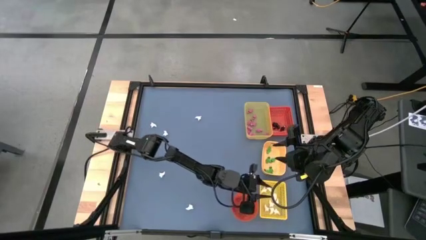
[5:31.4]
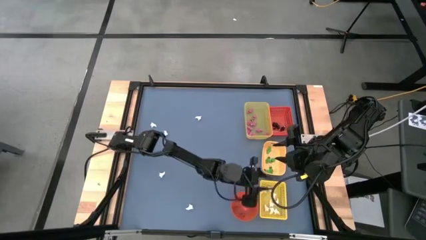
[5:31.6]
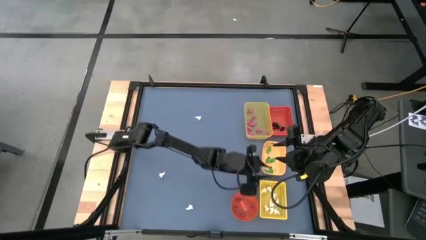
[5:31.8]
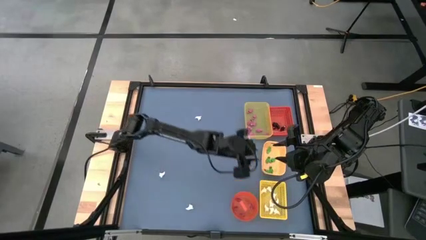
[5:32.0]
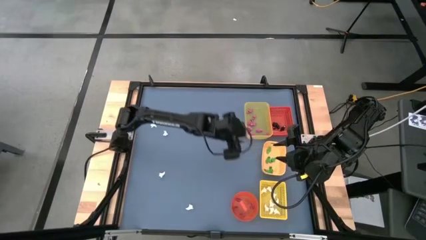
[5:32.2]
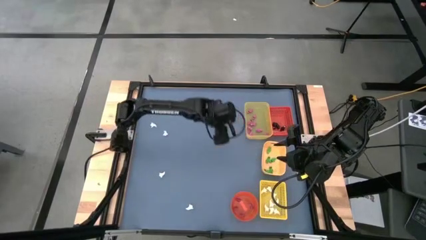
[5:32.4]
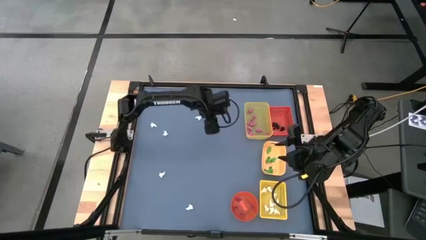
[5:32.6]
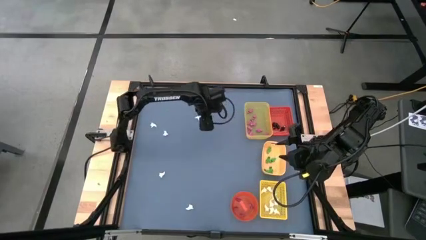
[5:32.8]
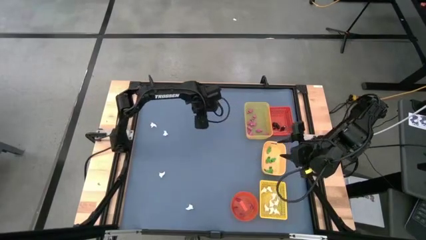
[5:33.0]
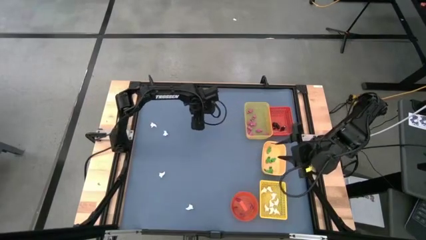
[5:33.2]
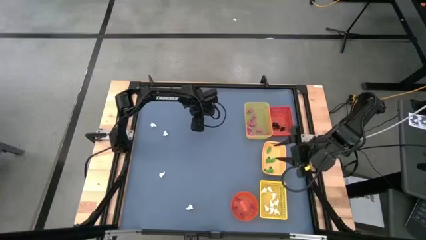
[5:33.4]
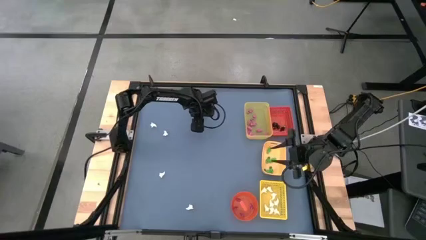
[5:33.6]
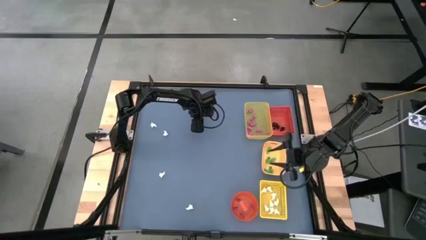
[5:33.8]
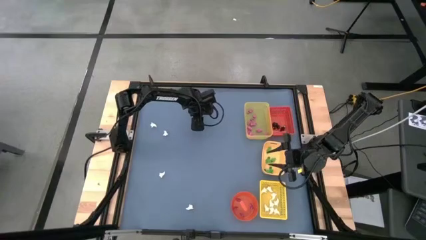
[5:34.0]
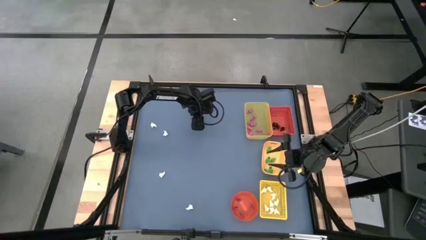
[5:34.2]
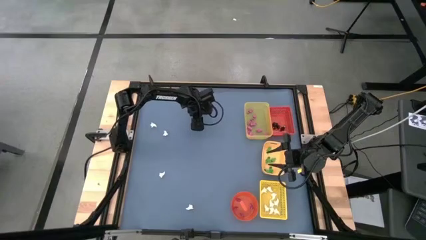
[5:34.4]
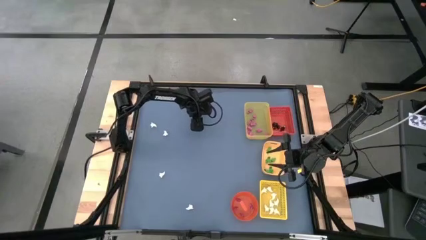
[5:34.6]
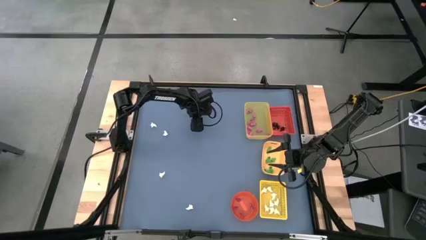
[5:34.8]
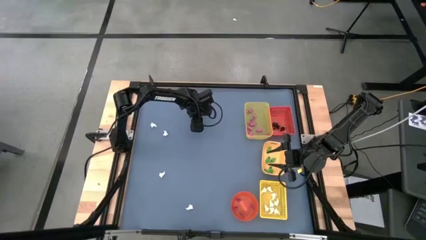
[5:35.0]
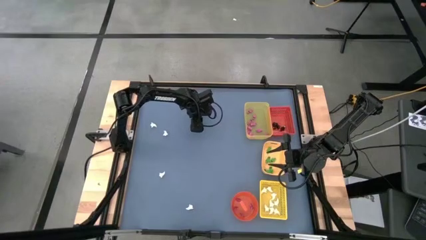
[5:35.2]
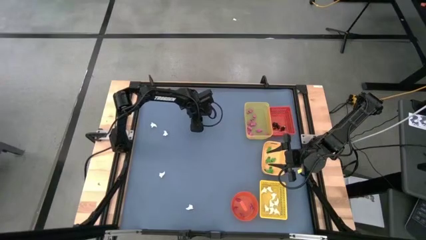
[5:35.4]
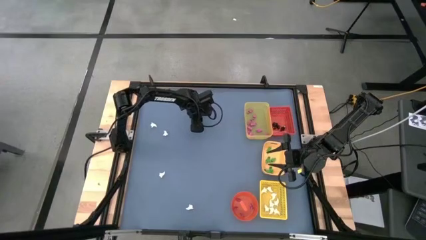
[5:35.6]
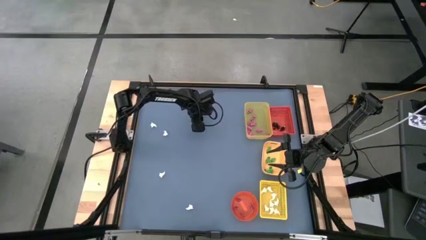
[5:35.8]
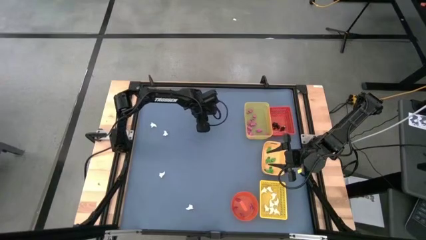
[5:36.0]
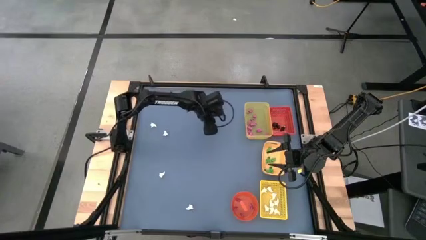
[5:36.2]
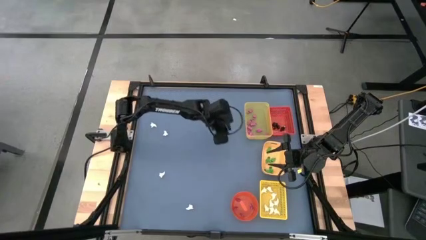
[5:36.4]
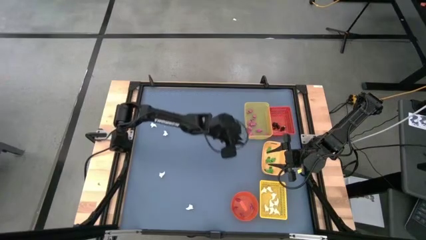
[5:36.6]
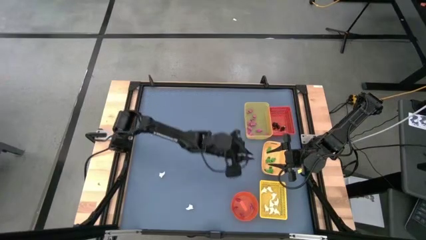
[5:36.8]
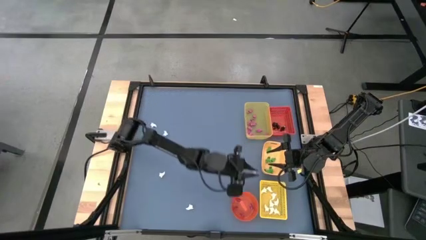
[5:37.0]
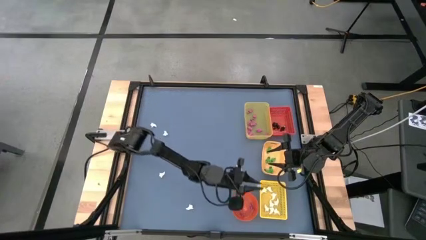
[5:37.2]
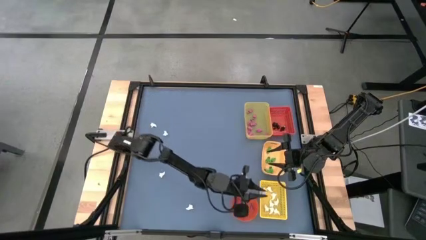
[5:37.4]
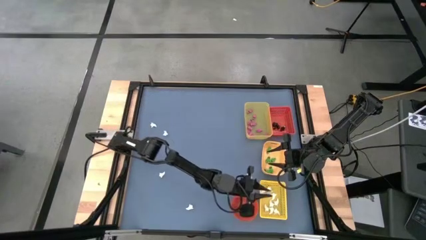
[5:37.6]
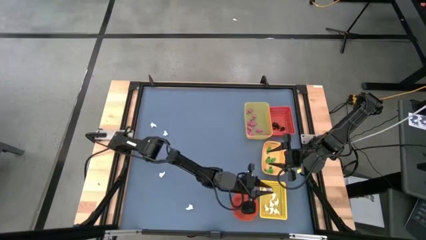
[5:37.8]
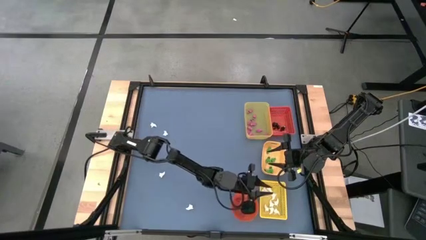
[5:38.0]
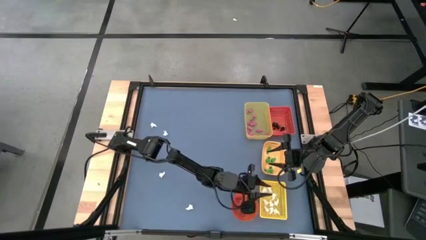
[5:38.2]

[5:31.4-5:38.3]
Task: Sort Halloween decoration
Put the white ghost toy into the yellow box

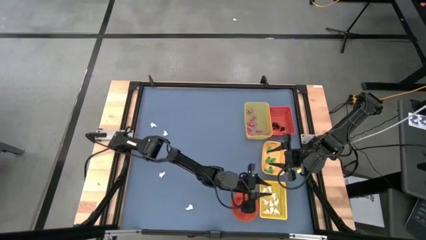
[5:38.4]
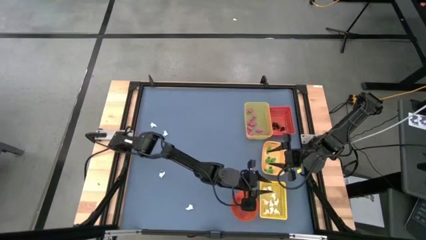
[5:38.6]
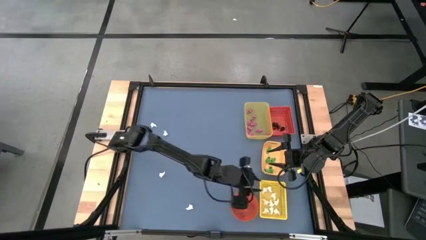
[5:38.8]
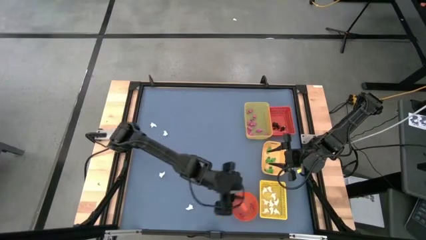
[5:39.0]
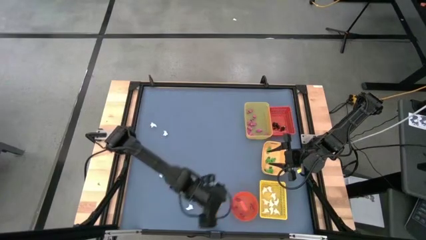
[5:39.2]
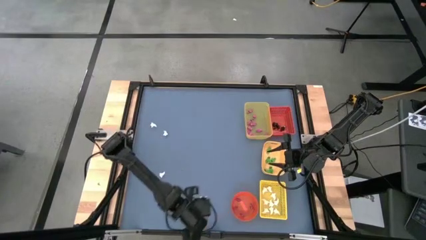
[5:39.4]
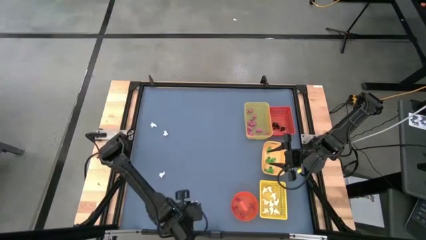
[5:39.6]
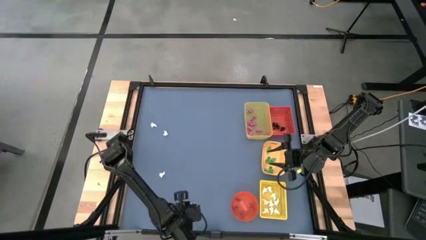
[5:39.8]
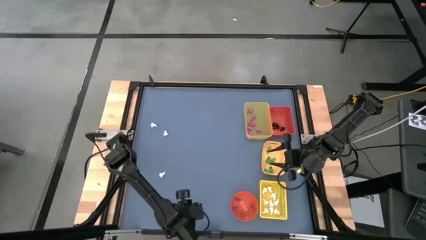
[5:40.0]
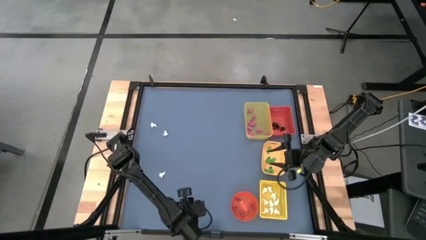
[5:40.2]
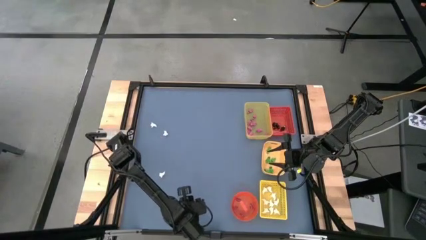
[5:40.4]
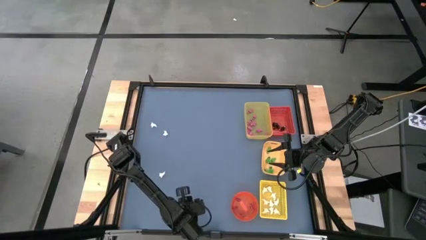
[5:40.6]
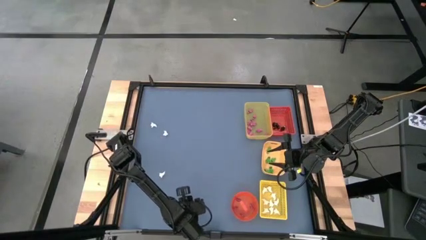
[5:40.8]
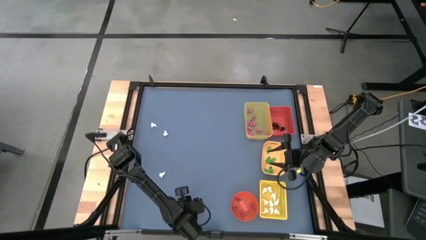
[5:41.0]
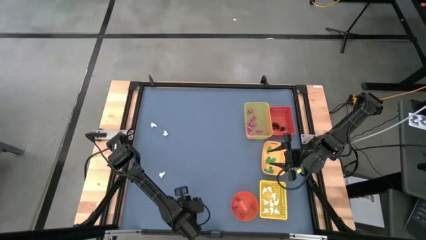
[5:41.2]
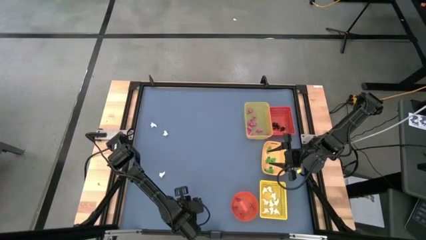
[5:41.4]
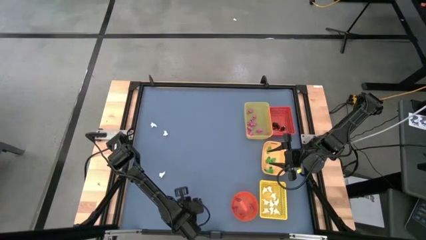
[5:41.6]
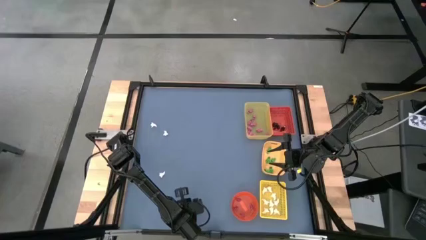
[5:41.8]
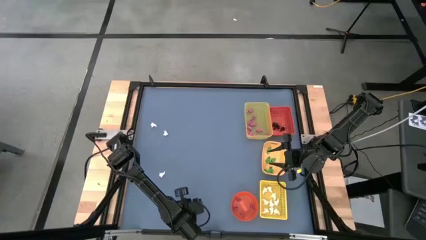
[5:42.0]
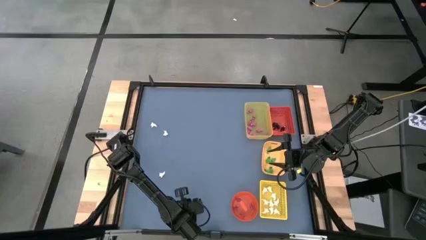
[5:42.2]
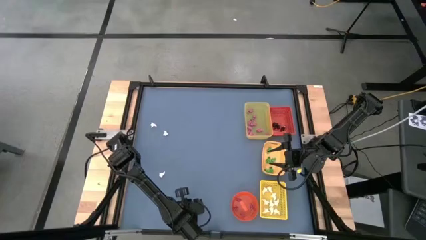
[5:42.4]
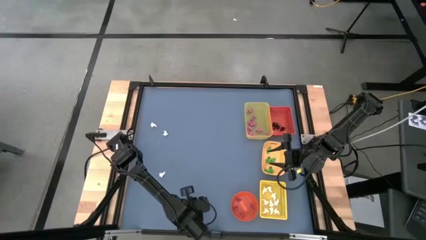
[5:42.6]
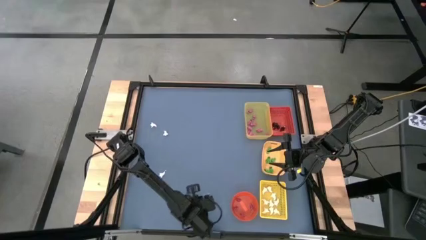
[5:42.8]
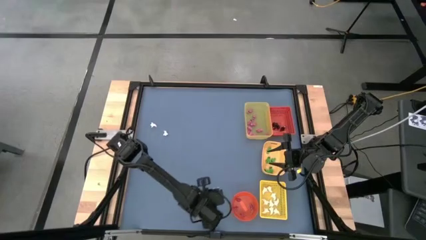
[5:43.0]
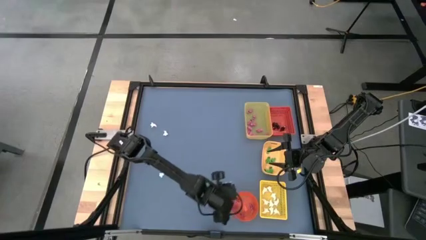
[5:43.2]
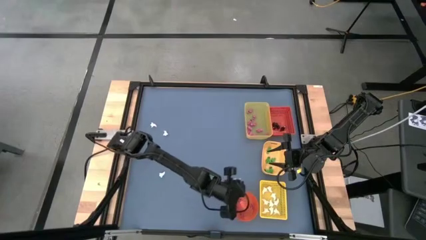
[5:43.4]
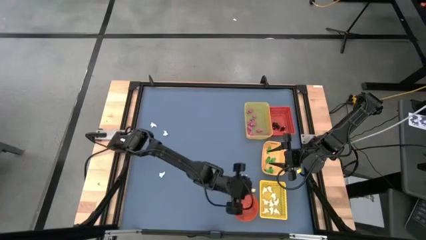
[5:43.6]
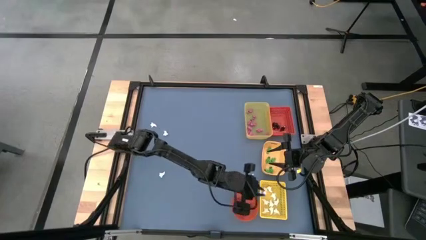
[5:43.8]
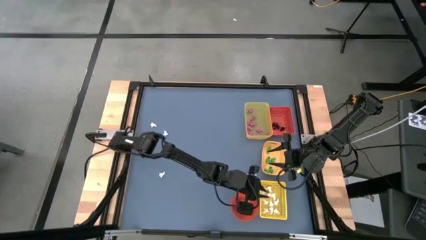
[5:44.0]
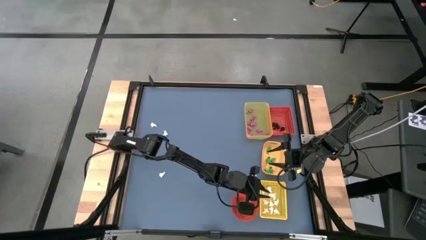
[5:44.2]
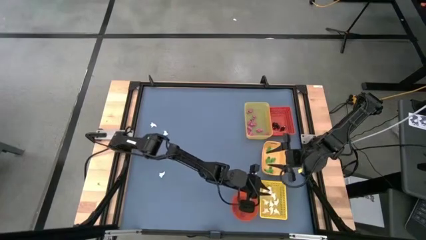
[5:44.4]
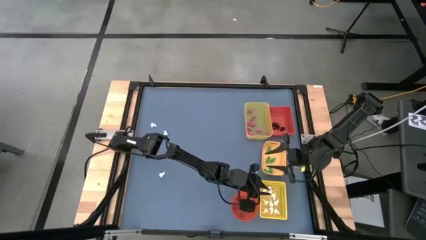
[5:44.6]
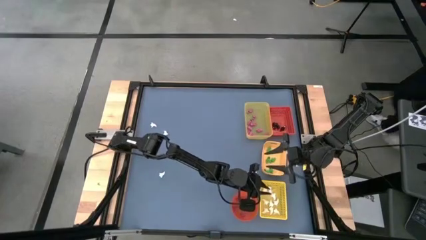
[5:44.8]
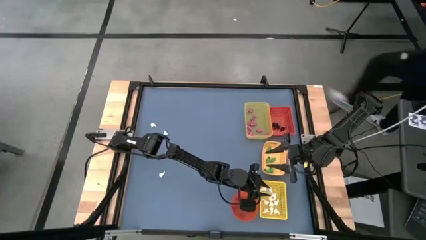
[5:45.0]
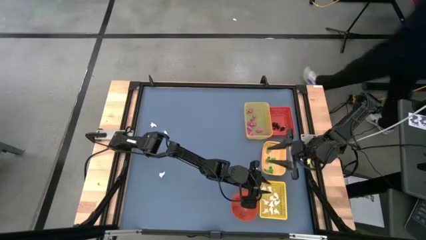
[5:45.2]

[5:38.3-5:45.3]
Put the white ghost toy into the yellow box
